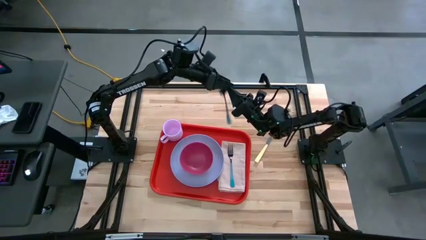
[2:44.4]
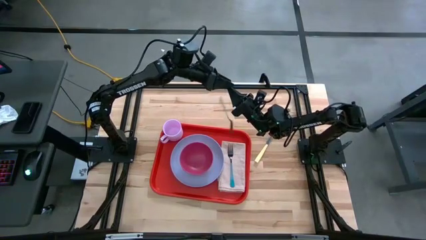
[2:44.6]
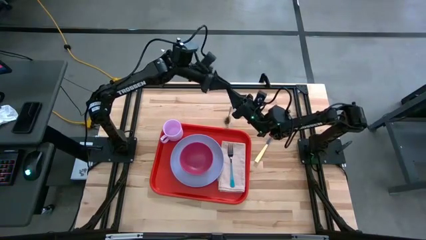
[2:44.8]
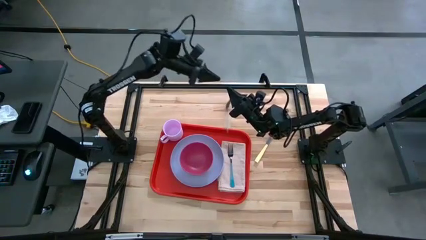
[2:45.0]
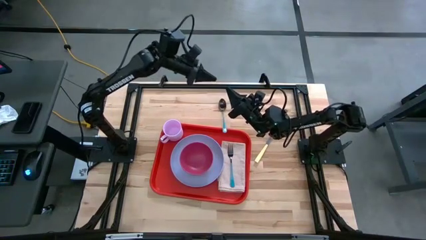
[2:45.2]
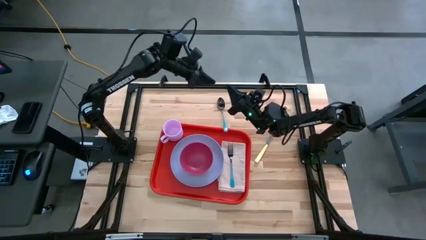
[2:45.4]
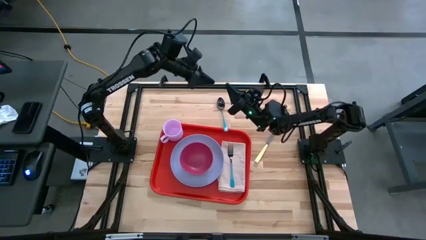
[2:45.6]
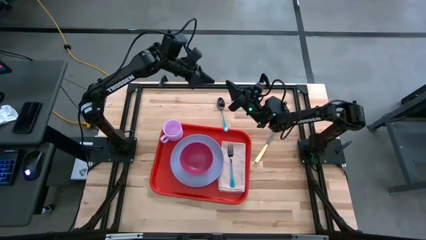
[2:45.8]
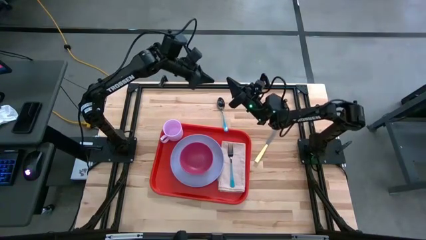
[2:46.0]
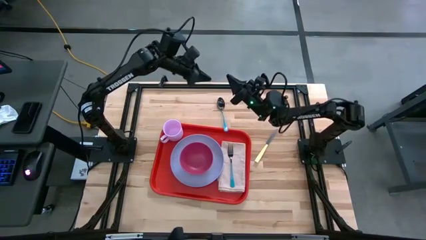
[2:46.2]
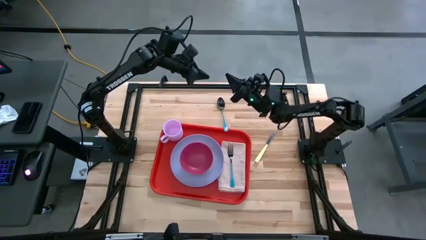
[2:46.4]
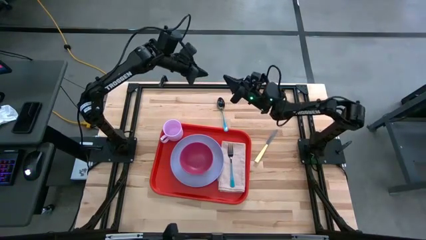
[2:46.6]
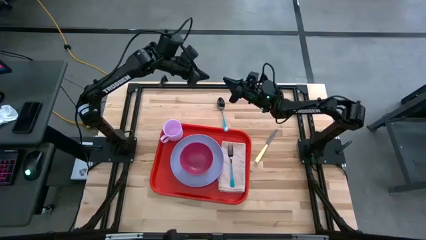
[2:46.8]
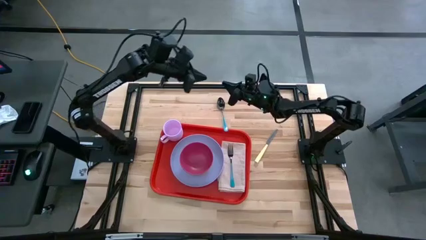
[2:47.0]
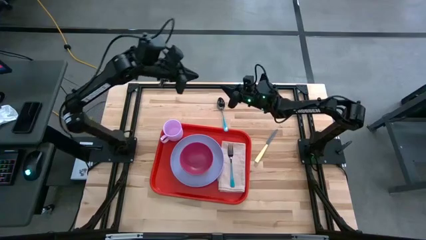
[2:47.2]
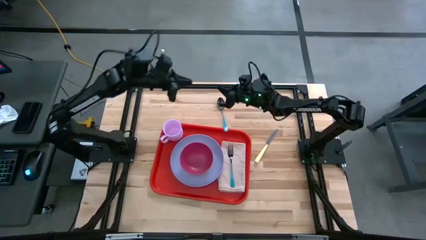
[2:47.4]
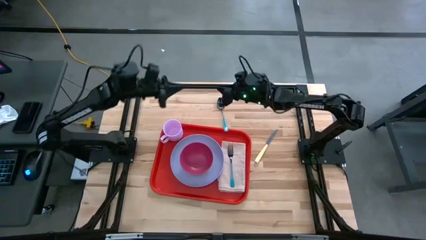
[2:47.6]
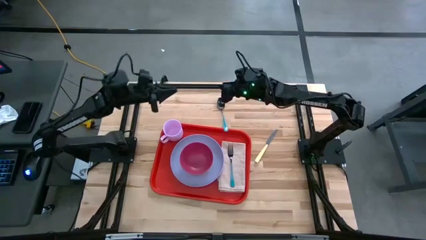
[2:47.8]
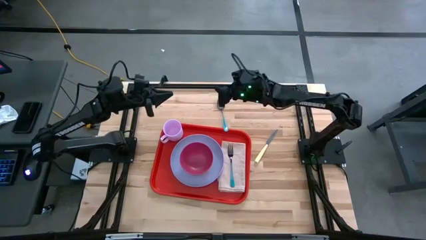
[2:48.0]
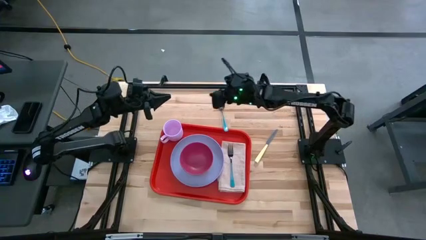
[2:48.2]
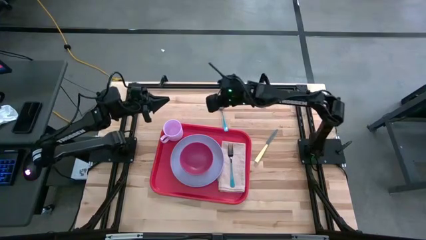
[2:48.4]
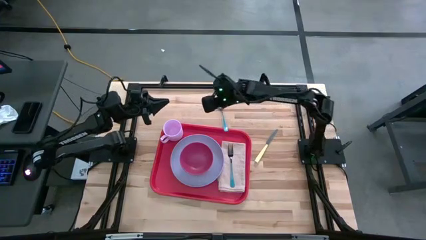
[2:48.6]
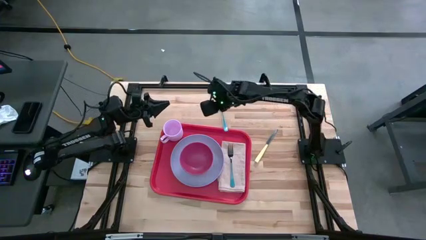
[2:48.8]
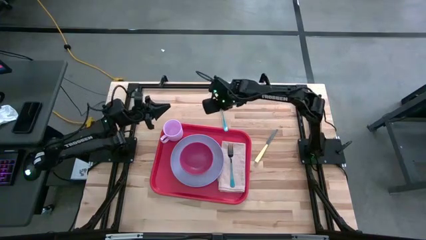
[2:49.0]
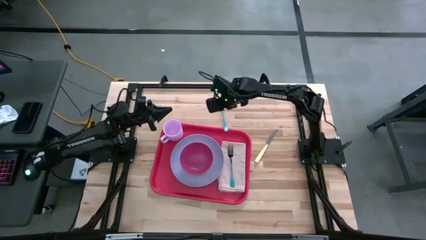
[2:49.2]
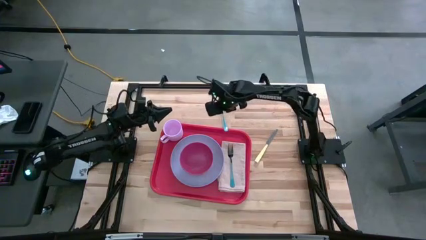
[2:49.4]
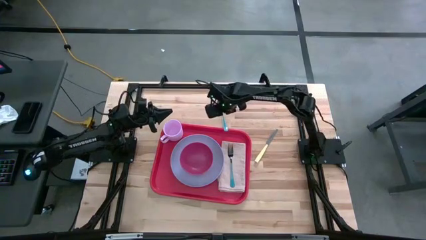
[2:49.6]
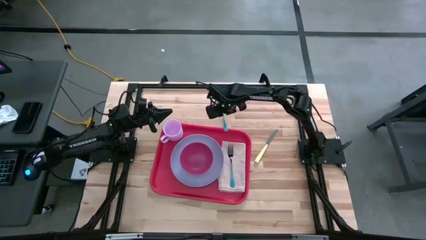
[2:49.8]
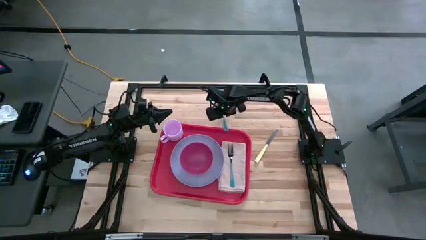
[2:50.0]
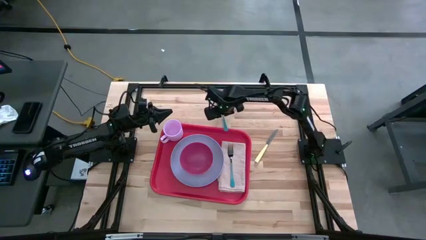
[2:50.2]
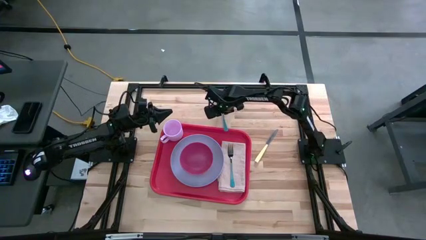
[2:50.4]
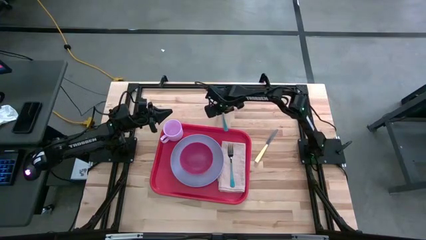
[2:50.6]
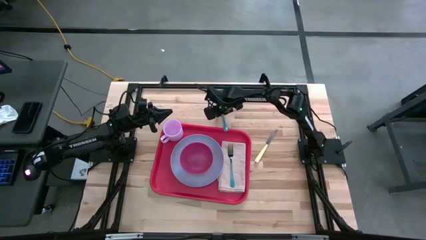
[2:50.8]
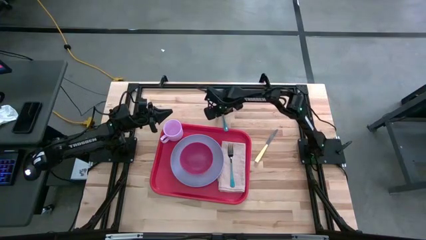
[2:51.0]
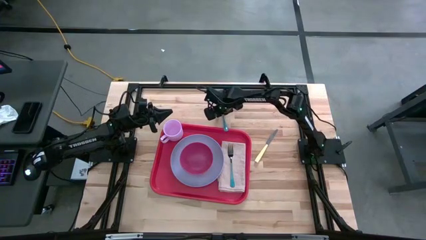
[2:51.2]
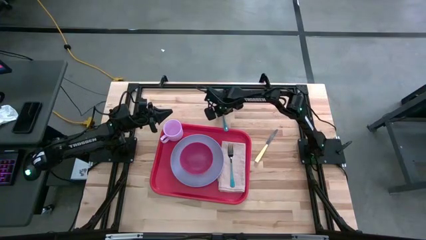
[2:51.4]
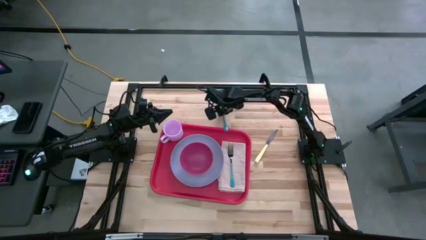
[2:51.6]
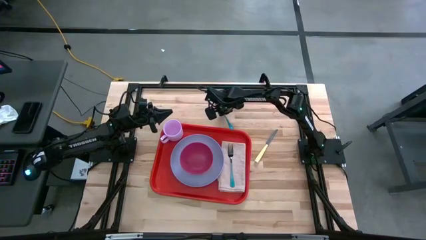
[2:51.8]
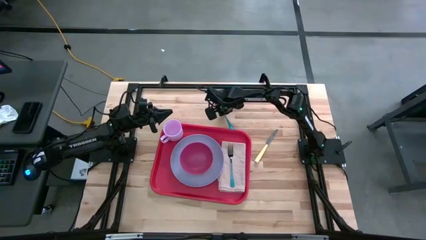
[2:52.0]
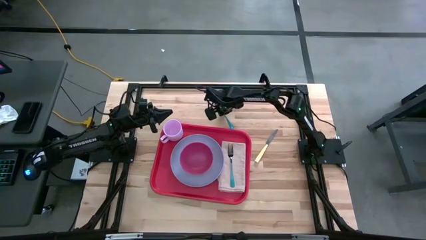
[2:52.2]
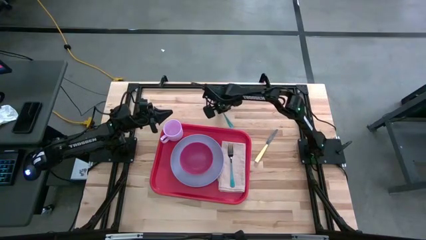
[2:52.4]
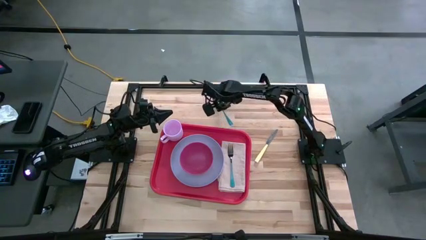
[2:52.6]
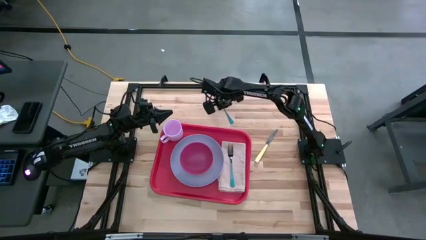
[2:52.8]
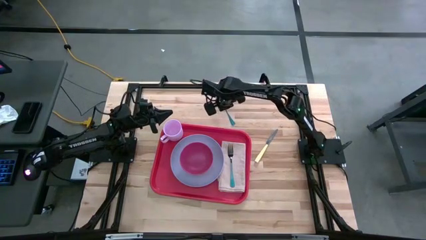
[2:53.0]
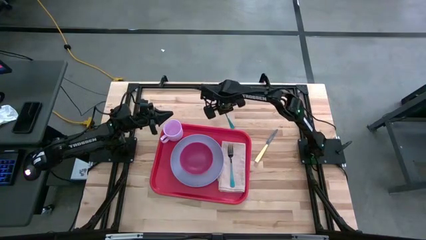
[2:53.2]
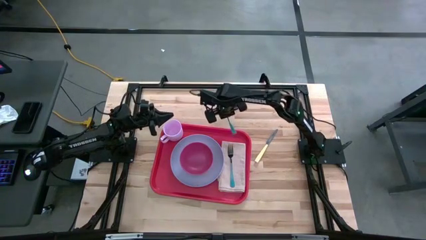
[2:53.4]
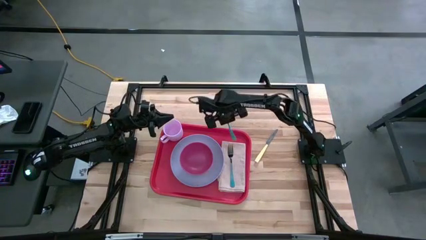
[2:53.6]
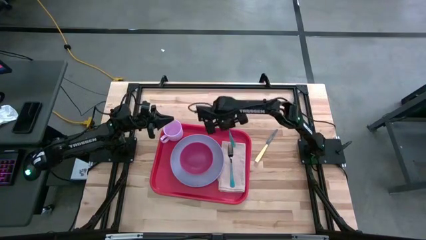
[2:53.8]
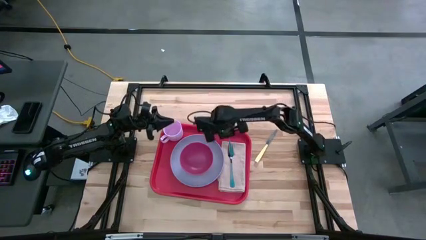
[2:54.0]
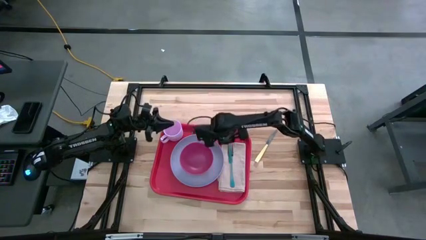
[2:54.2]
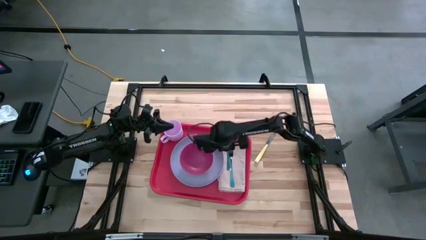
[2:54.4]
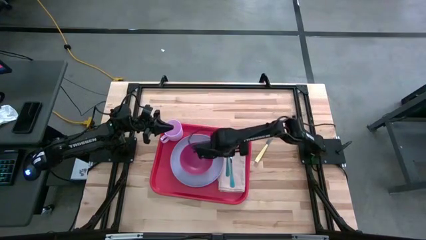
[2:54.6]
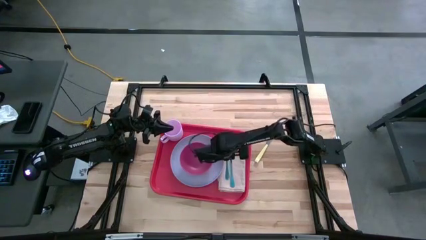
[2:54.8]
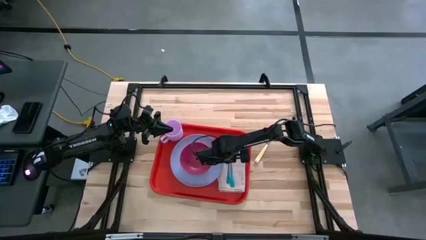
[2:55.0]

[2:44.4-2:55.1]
Task: Set up tray
Put the blue spoon on top of the gray napkin to the left of the blue fork

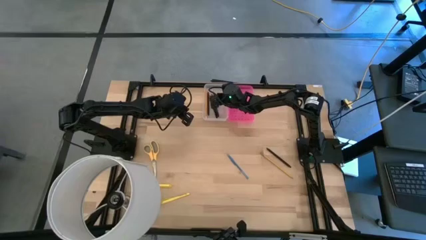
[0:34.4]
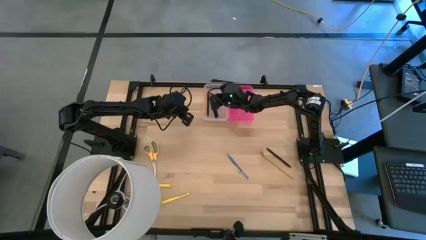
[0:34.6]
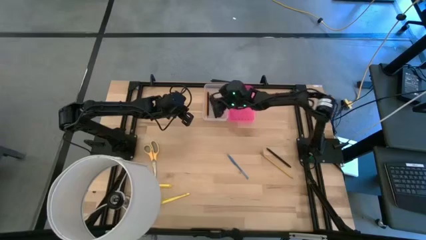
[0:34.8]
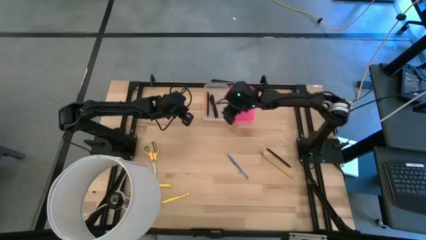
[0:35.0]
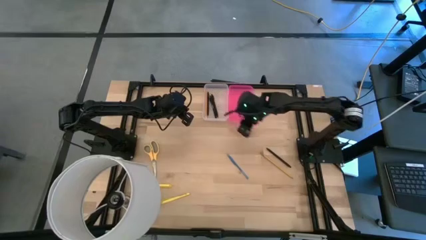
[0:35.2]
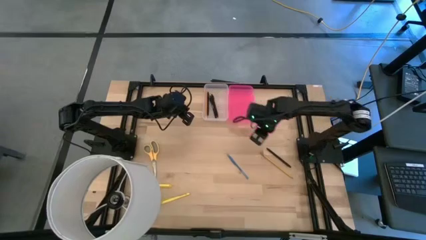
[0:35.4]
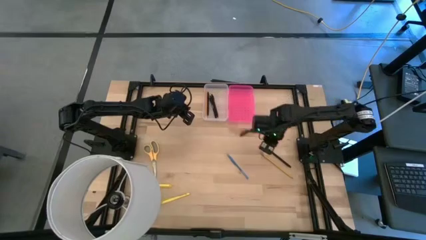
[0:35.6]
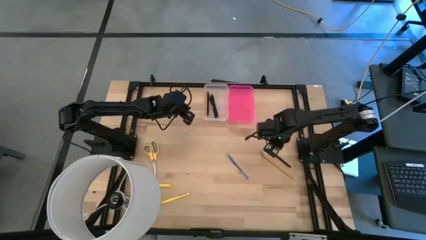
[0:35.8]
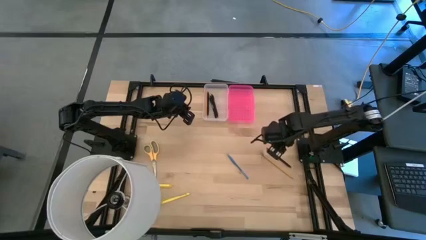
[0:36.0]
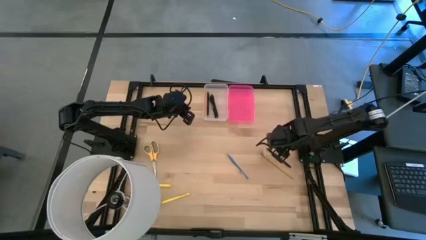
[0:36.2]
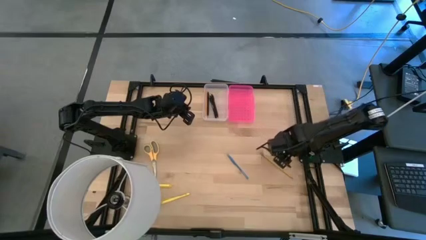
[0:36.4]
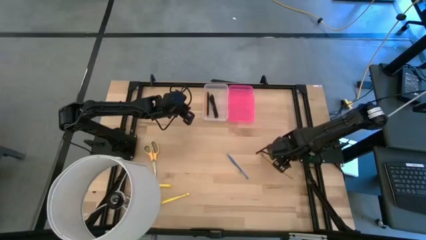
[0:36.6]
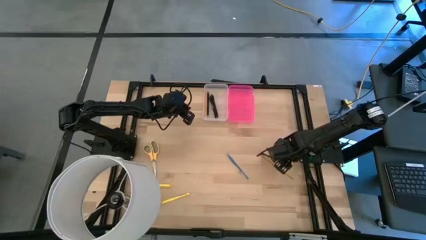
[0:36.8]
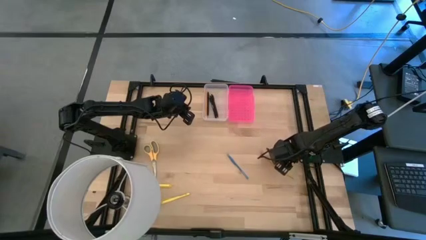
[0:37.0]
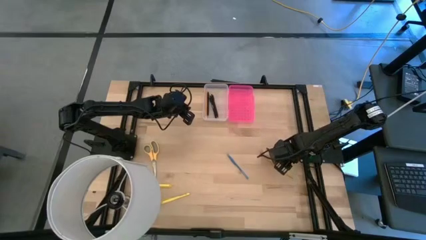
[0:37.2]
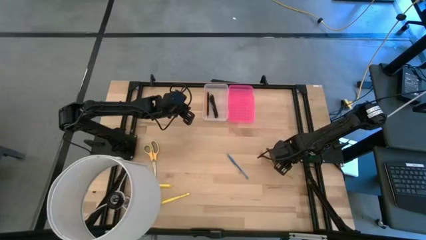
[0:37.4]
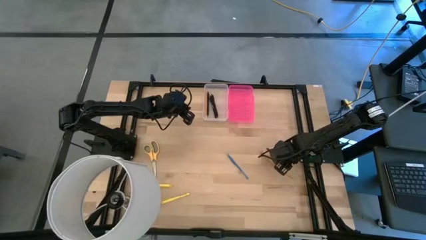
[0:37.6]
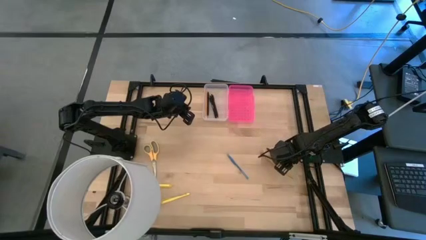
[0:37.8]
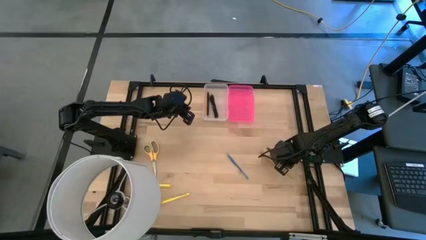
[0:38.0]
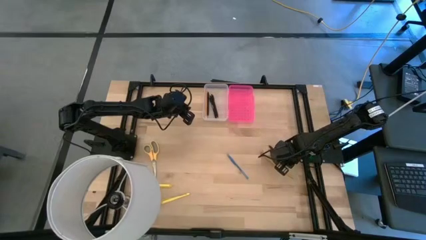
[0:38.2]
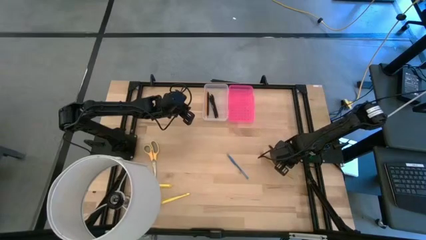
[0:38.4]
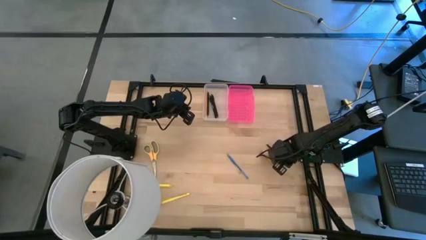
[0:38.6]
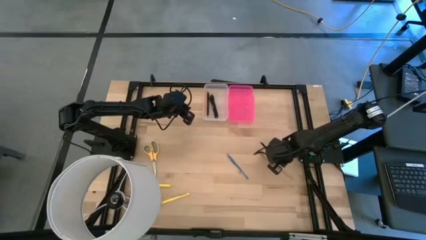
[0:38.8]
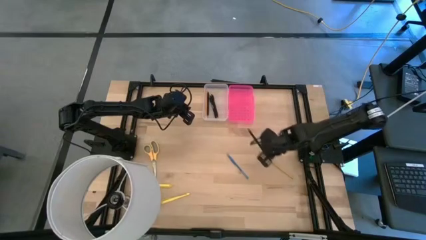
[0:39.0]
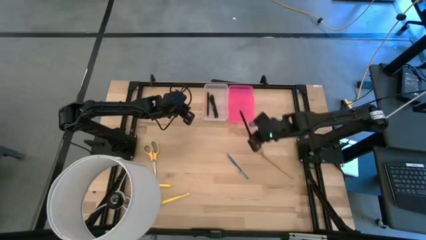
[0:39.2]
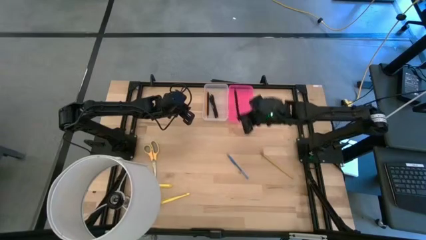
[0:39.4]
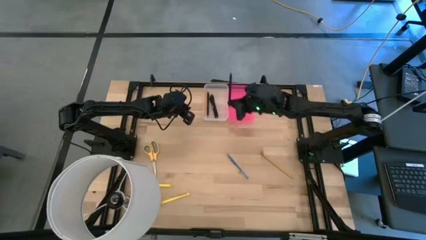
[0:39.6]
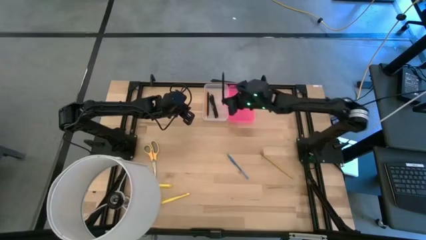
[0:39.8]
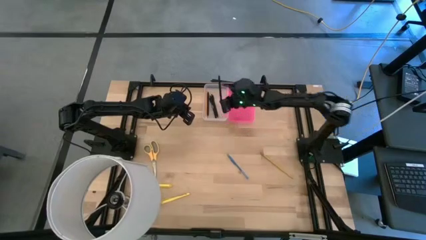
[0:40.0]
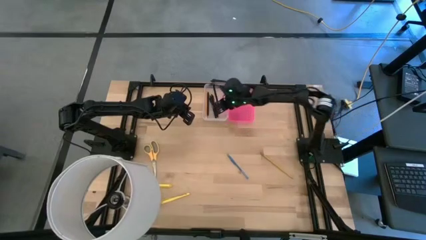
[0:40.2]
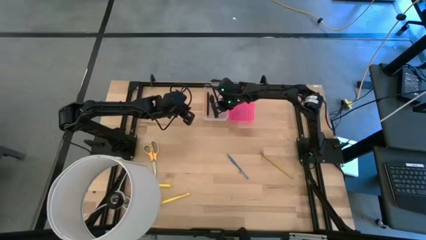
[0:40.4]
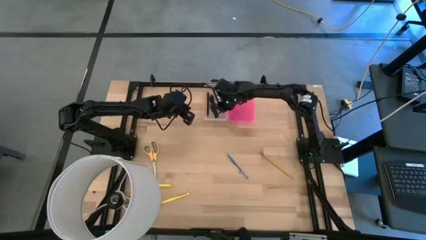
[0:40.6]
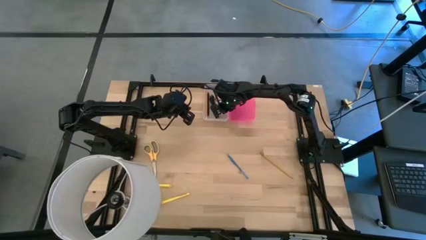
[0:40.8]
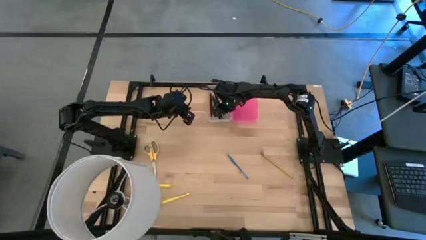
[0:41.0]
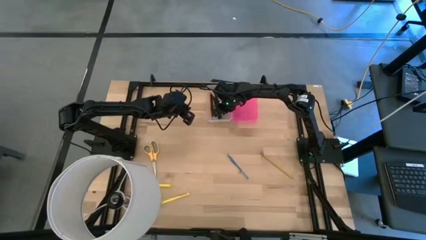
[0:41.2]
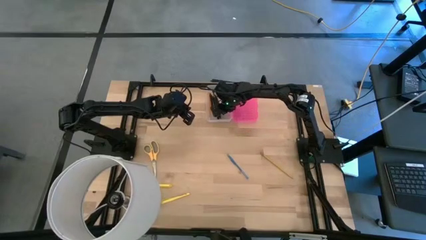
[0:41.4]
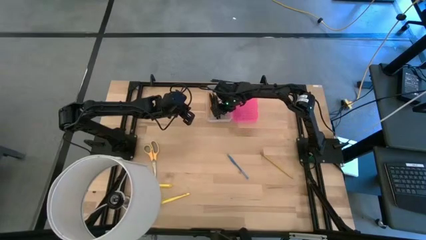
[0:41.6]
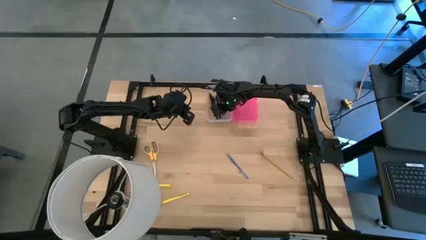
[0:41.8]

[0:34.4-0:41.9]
Task: Pick & place school supplies into a supply box
Put the black pen into the transparent supply box
